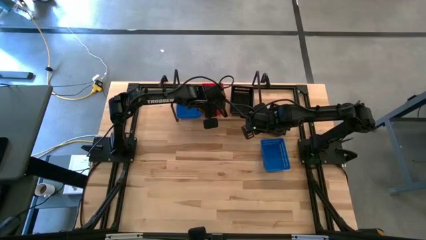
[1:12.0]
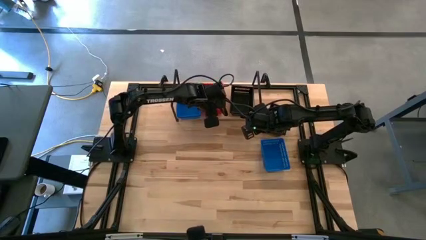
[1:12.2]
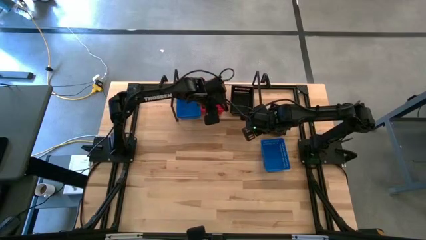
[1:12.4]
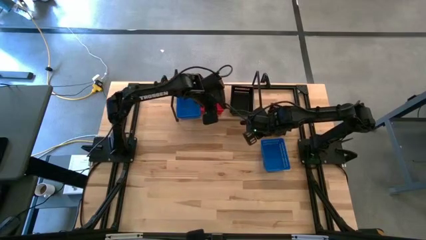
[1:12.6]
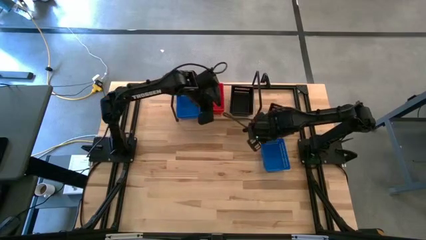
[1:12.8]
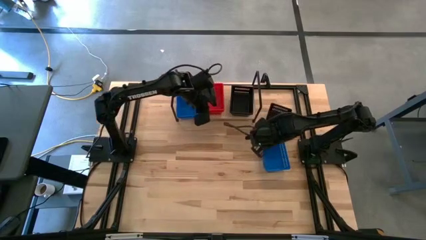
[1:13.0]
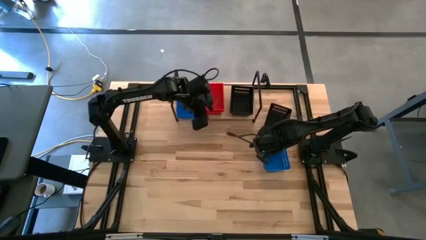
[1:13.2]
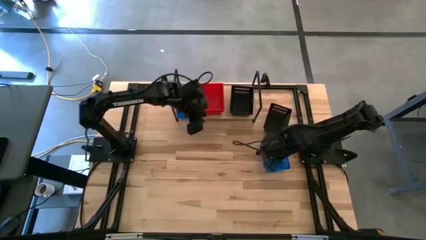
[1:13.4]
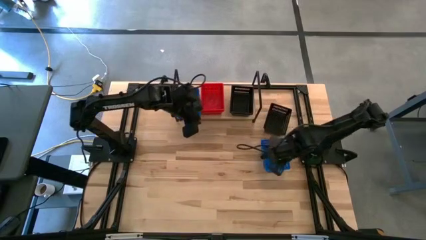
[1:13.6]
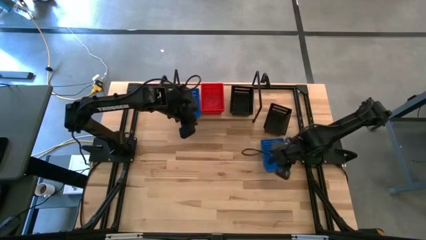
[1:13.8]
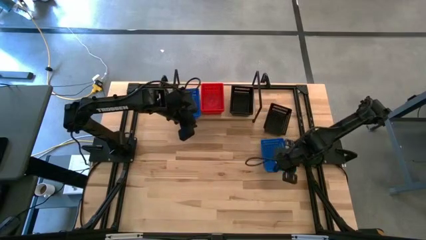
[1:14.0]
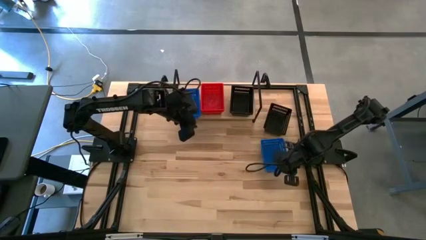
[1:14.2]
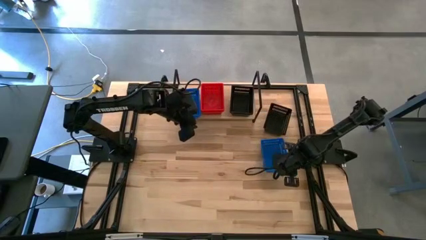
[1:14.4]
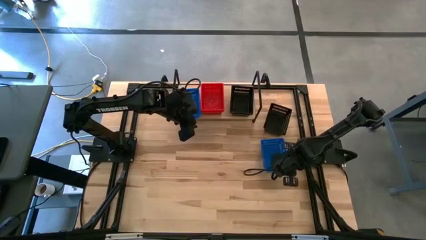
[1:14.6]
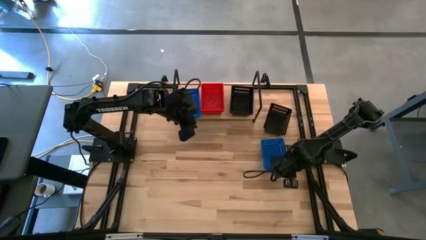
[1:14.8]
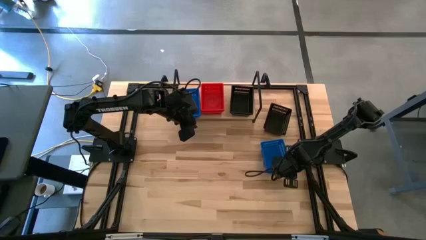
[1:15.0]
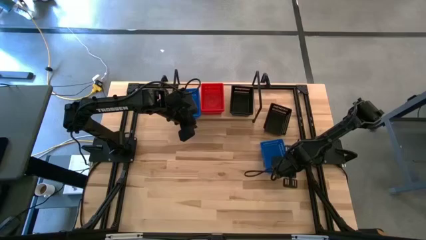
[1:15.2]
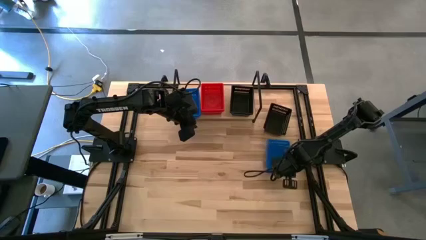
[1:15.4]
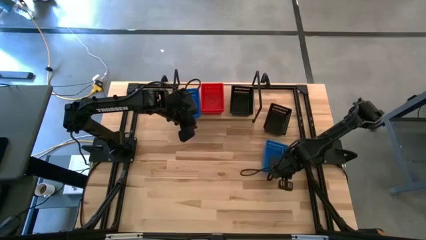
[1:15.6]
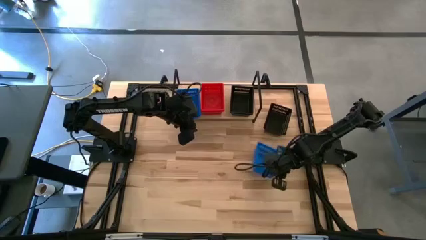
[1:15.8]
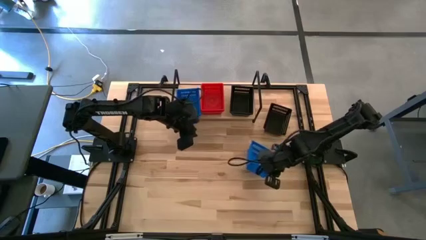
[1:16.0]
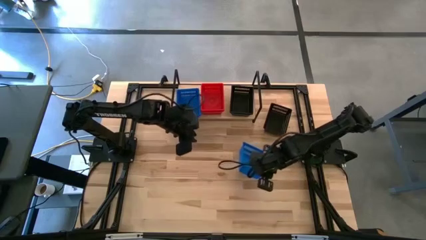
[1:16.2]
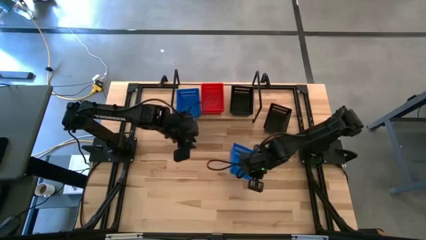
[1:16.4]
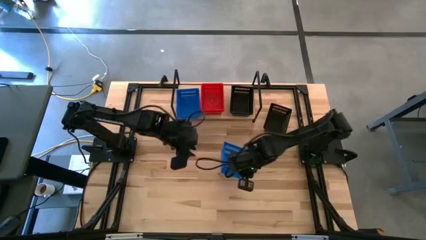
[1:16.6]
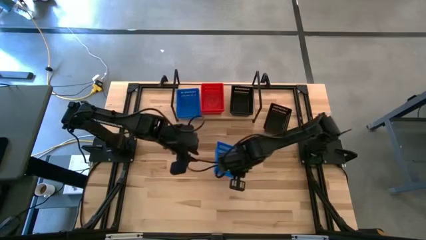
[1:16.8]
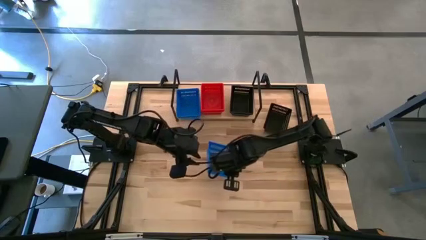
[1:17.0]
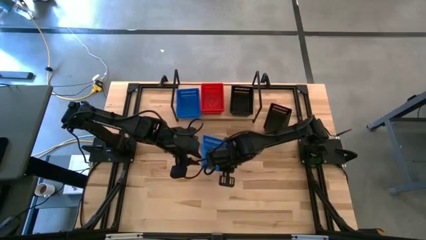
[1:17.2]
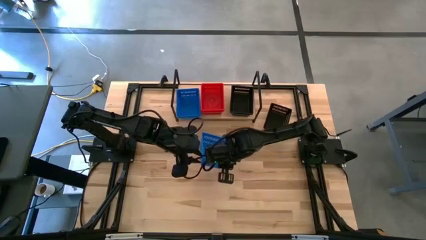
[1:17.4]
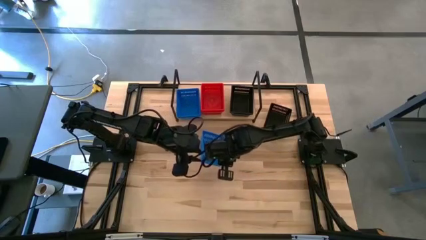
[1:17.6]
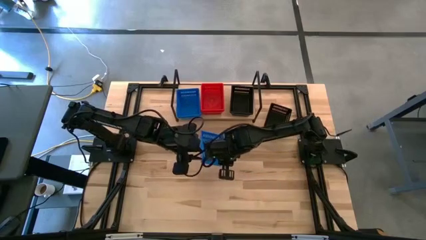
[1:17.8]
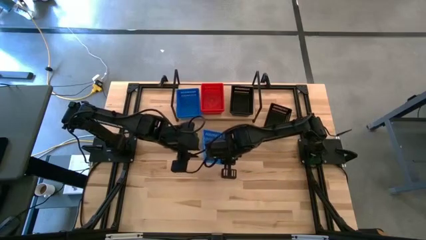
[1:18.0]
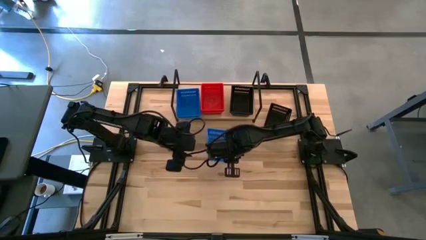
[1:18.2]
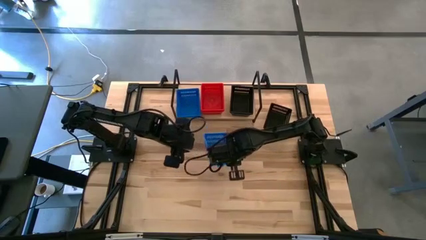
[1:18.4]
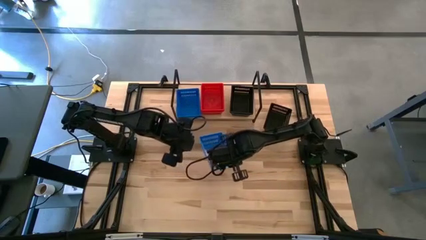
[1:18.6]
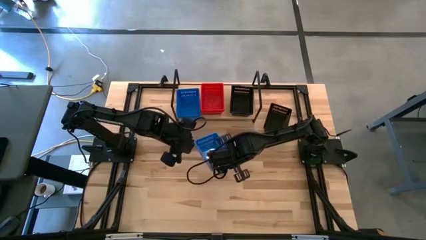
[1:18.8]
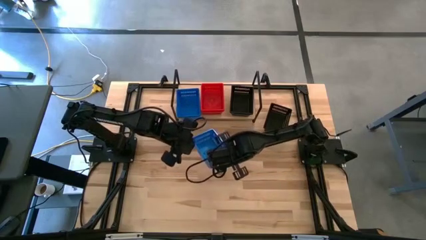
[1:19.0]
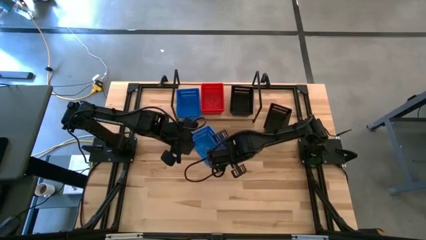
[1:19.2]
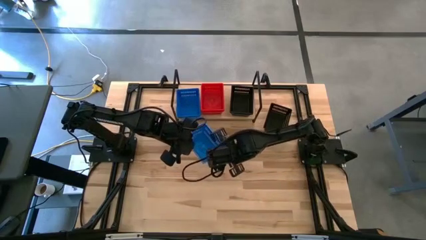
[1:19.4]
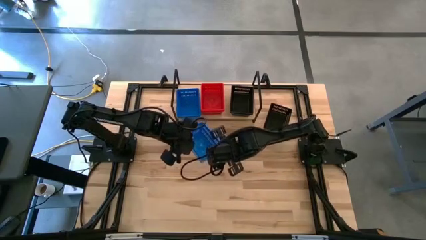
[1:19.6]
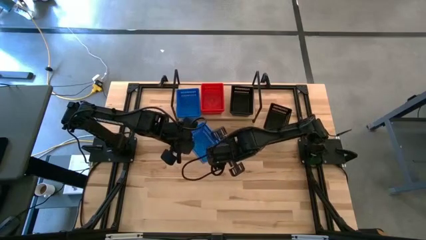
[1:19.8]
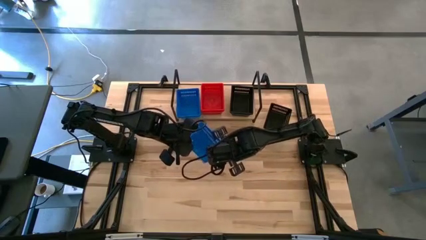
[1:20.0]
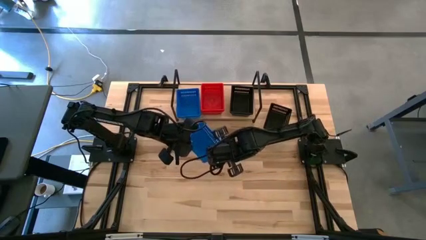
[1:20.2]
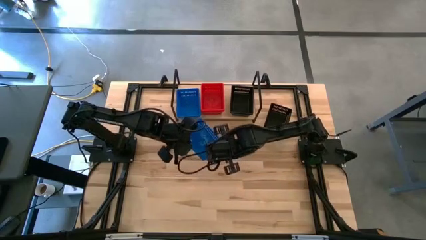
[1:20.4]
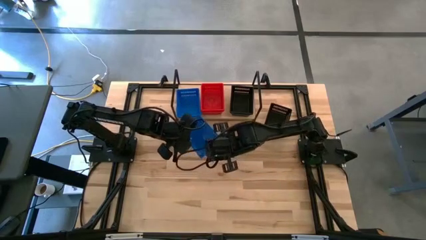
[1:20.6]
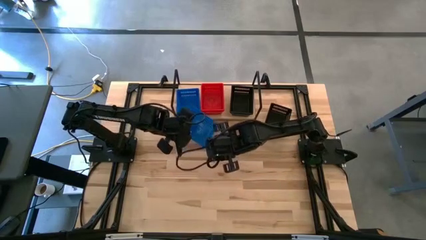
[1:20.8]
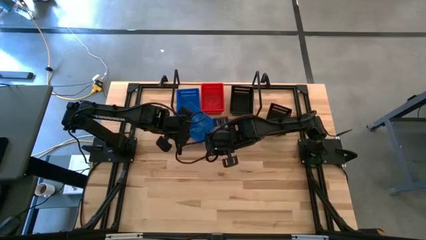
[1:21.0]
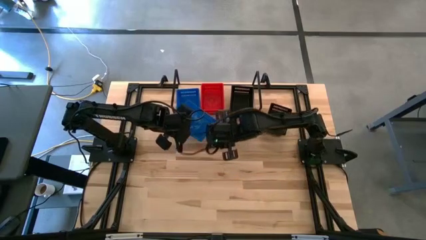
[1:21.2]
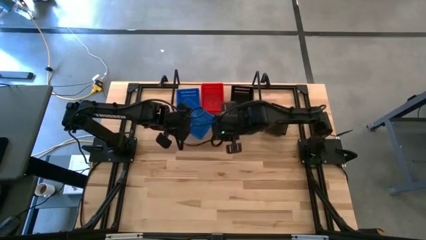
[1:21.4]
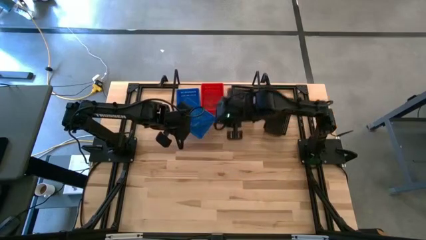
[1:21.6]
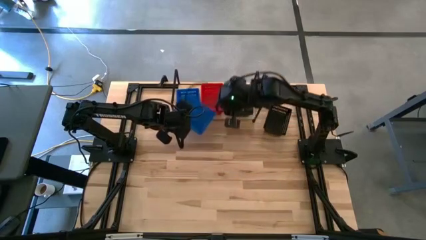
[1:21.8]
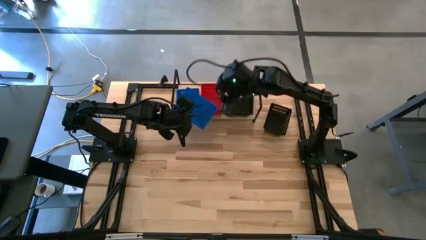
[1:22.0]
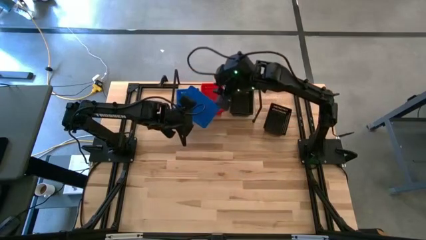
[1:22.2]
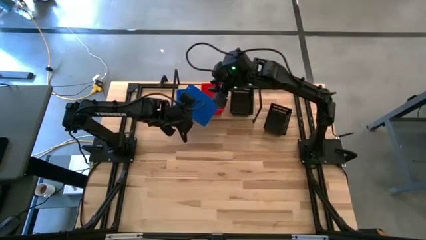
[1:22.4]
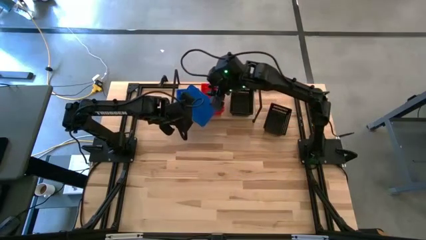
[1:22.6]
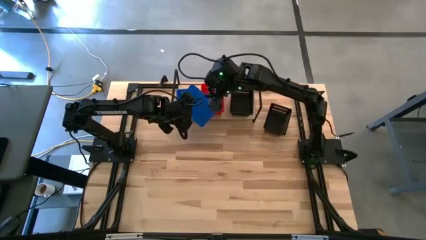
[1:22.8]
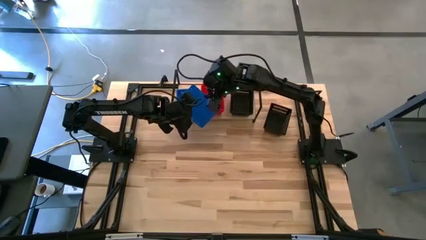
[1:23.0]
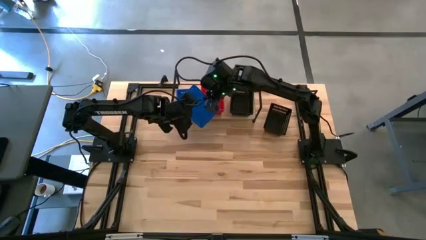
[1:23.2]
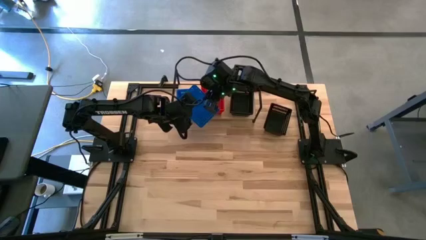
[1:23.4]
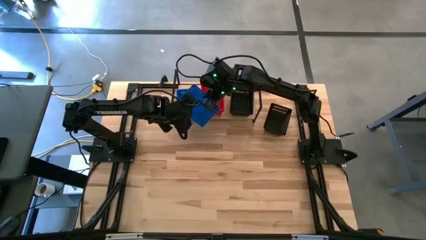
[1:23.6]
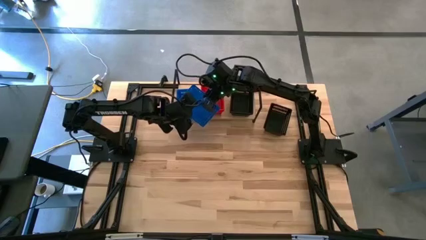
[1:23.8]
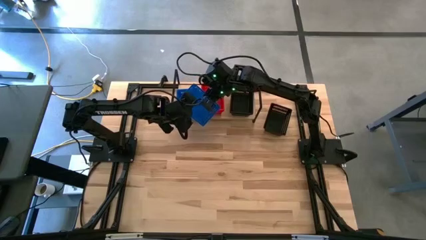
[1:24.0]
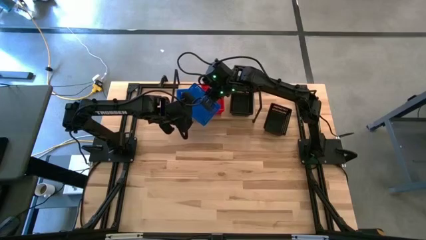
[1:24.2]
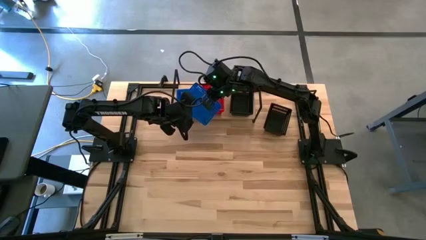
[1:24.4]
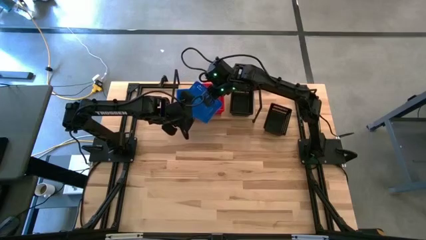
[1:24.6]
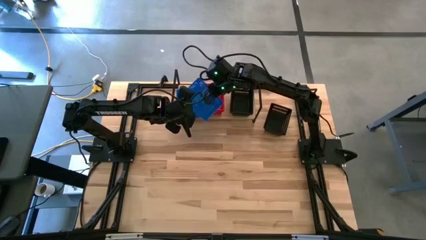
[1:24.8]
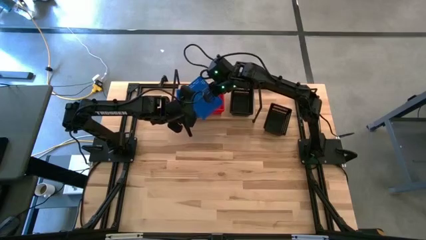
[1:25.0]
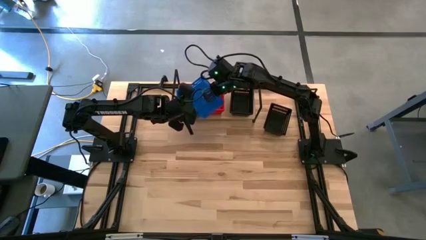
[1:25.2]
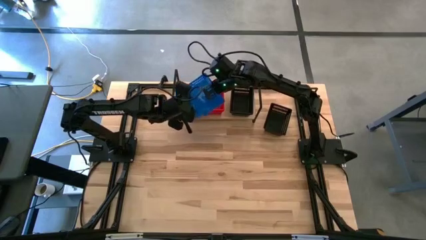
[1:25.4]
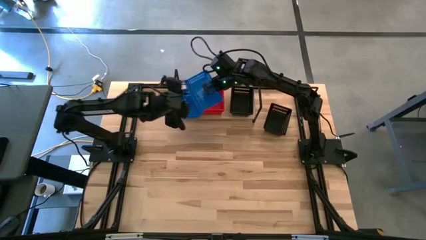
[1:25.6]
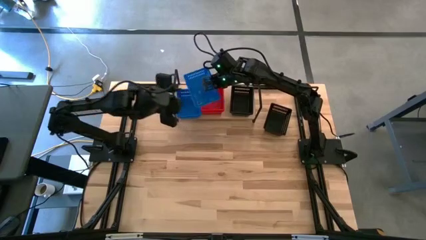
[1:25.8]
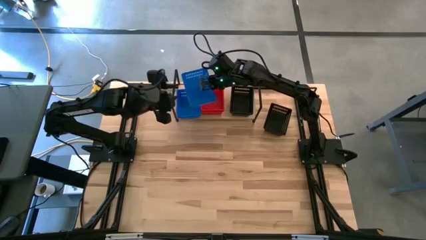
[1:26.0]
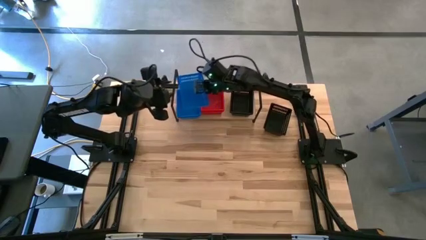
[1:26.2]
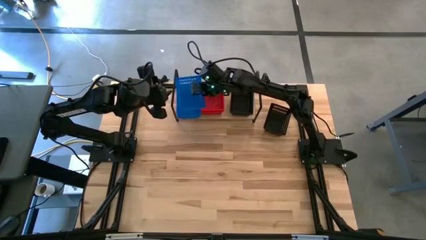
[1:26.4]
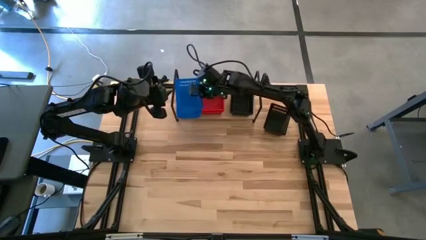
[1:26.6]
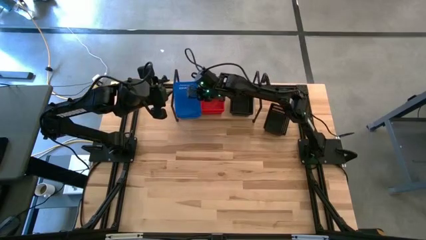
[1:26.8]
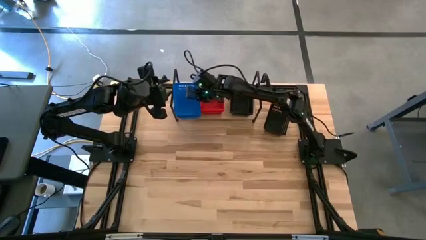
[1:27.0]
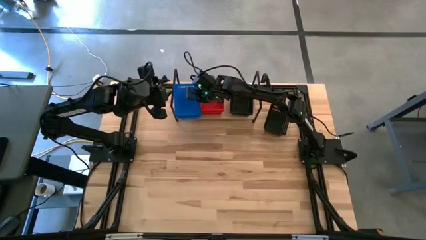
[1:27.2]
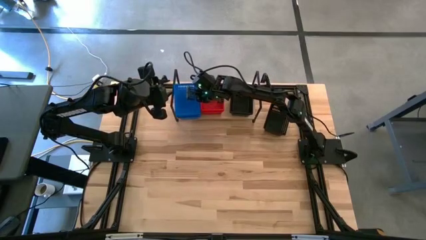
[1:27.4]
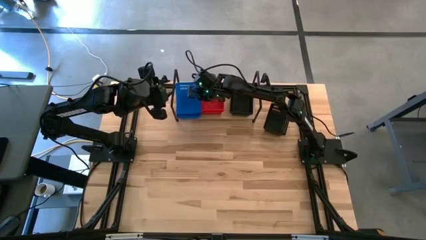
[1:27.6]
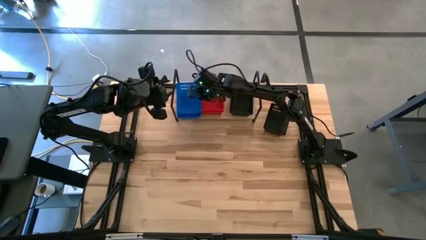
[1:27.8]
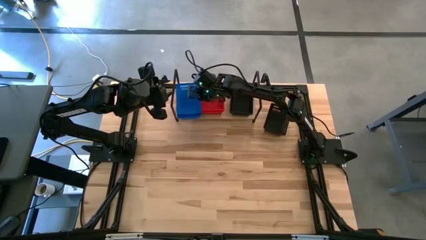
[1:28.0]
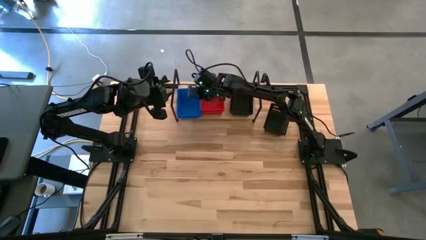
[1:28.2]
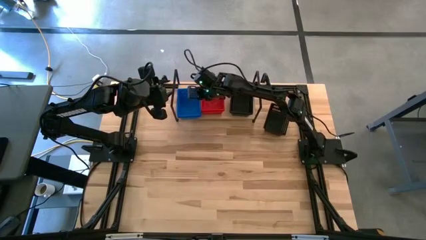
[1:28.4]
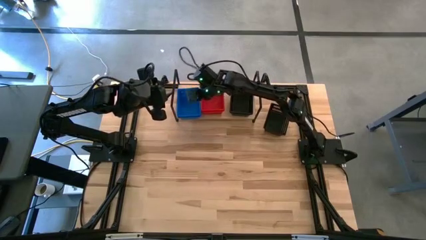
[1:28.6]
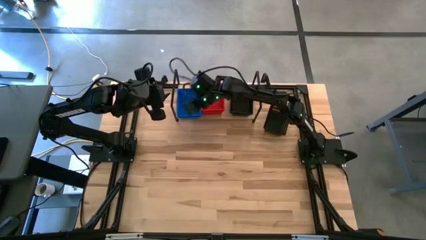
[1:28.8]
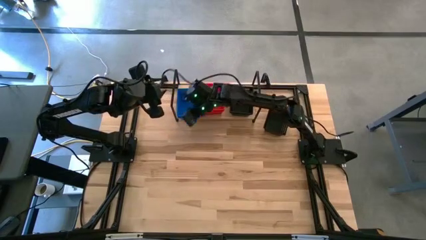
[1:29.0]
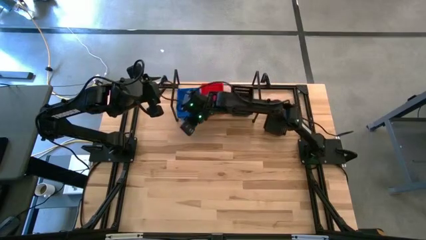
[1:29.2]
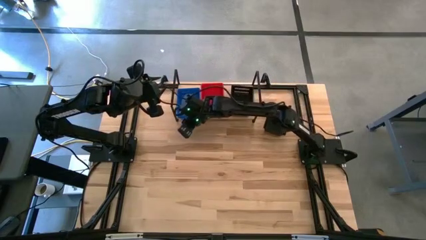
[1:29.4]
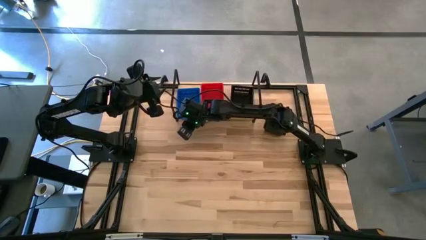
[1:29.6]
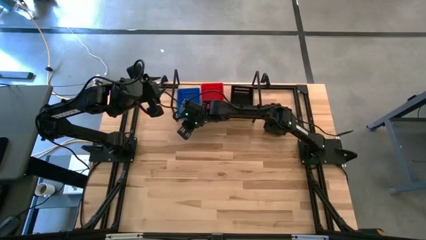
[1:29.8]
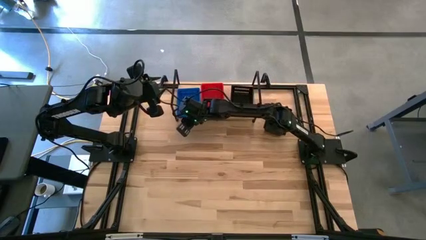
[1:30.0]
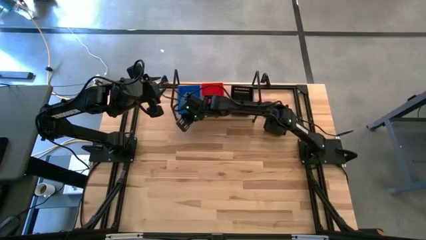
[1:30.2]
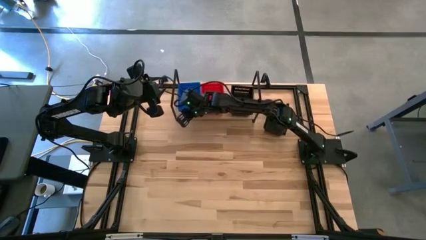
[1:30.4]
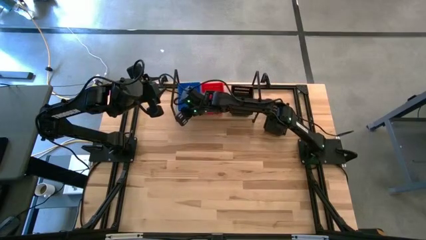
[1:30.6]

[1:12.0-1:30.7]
Task: Stack baskets on shelf by color
Stack the blue bin on top of the blue bin on the shelf
